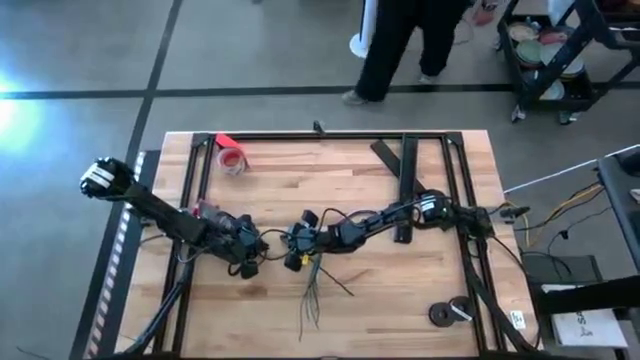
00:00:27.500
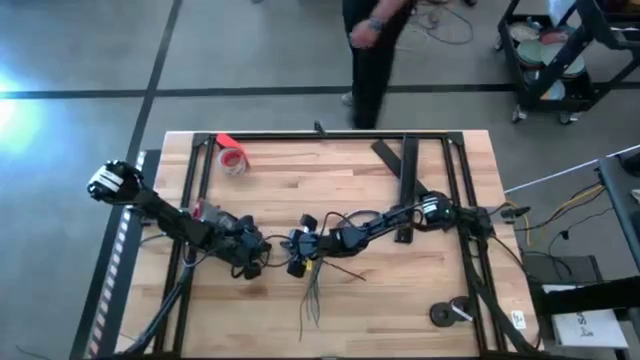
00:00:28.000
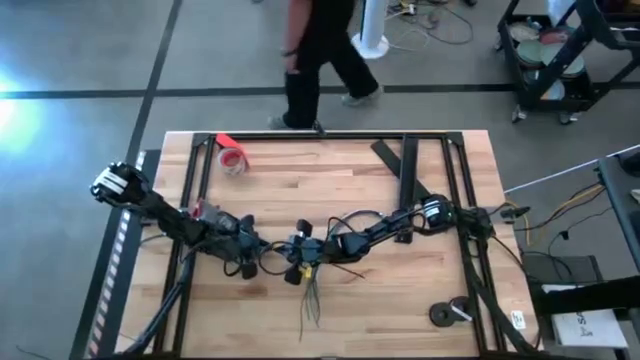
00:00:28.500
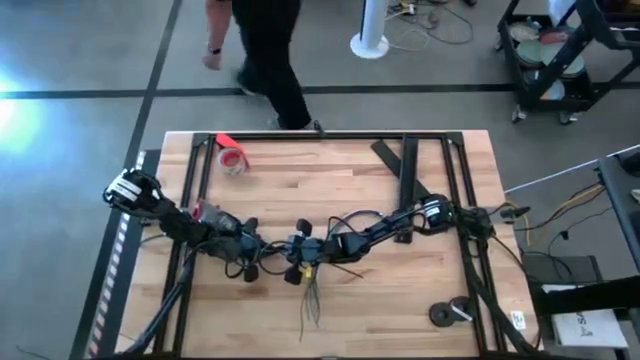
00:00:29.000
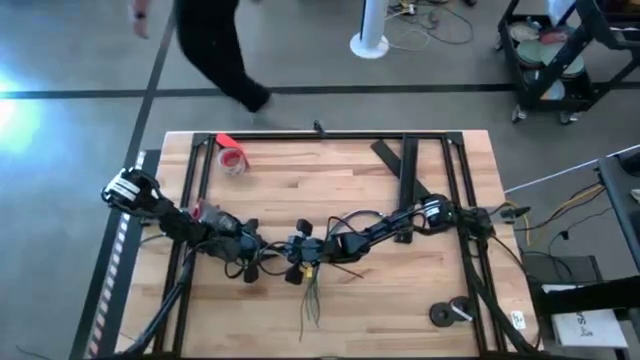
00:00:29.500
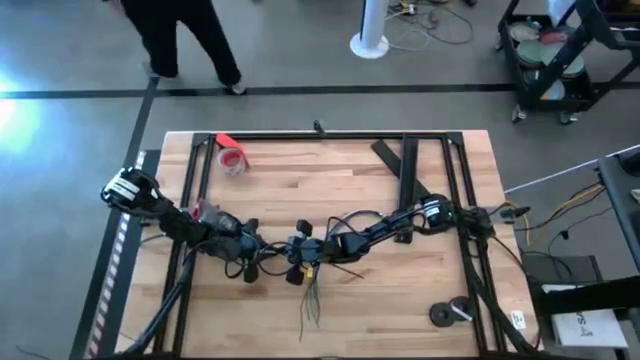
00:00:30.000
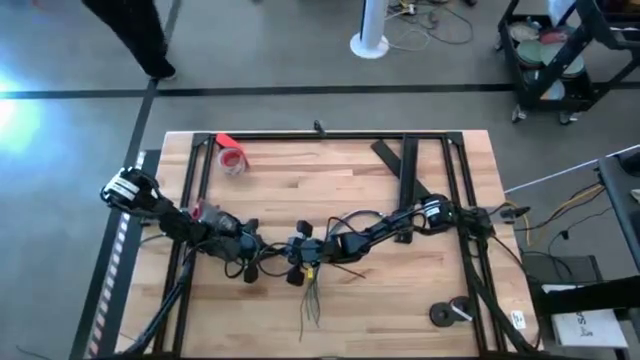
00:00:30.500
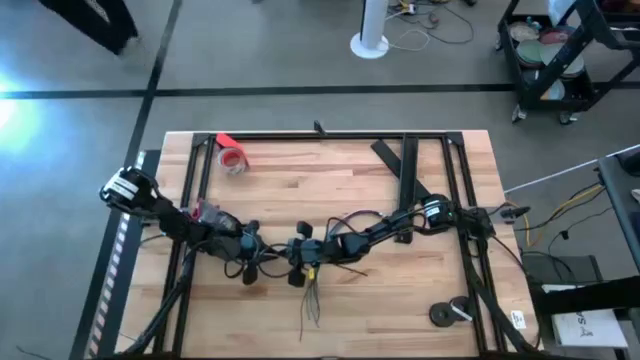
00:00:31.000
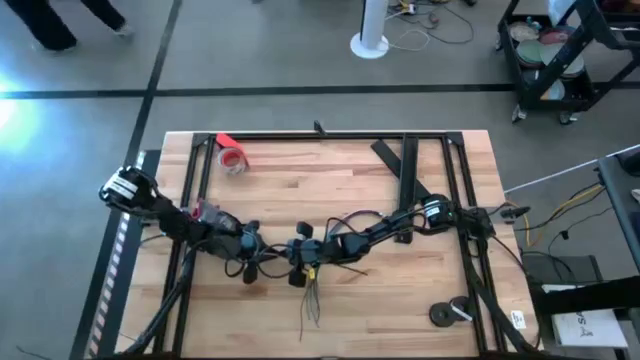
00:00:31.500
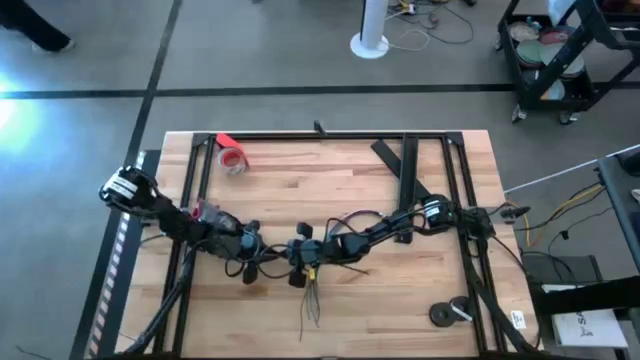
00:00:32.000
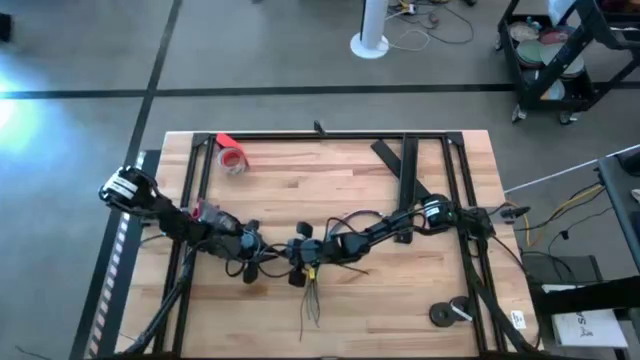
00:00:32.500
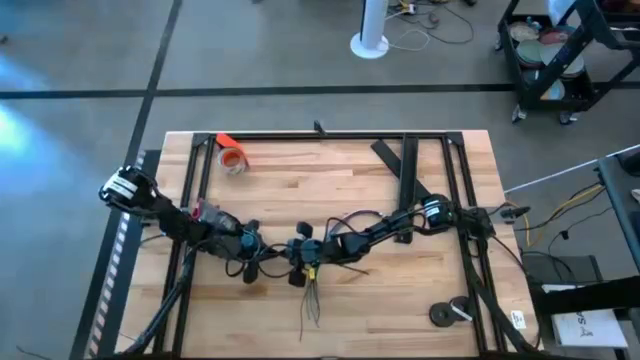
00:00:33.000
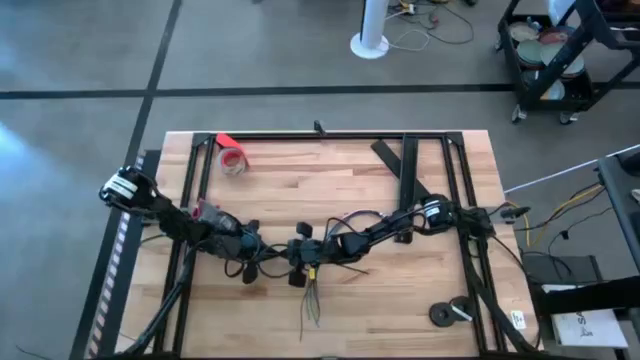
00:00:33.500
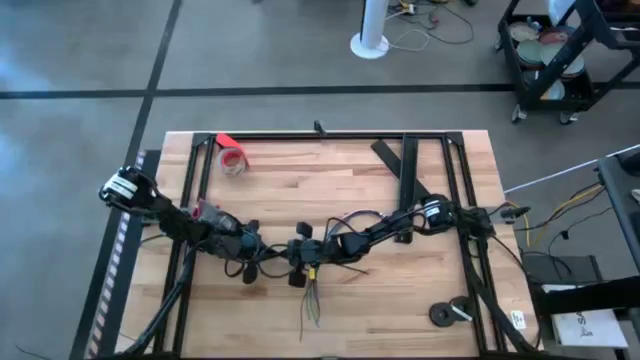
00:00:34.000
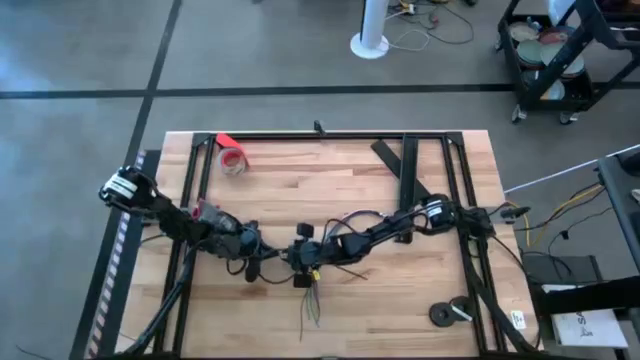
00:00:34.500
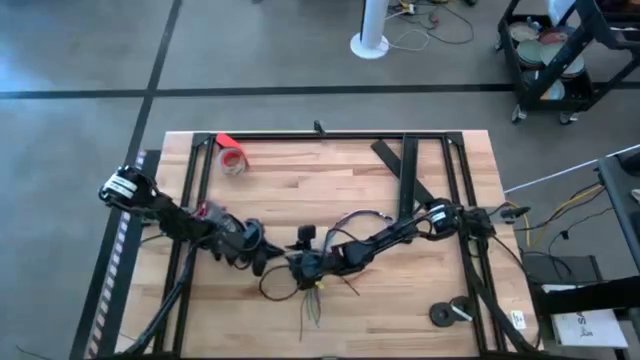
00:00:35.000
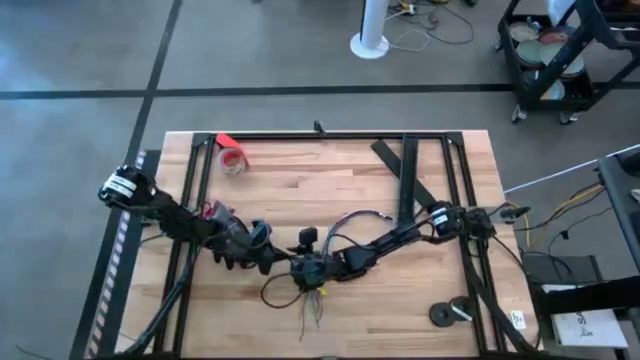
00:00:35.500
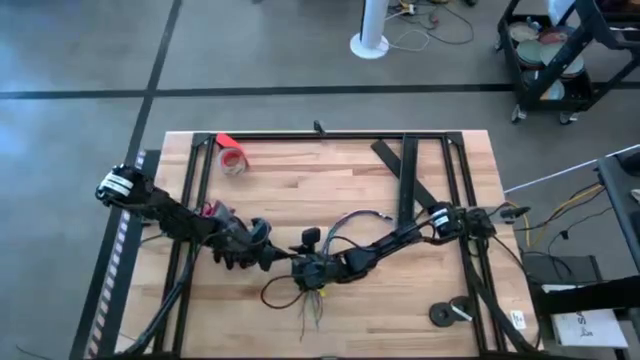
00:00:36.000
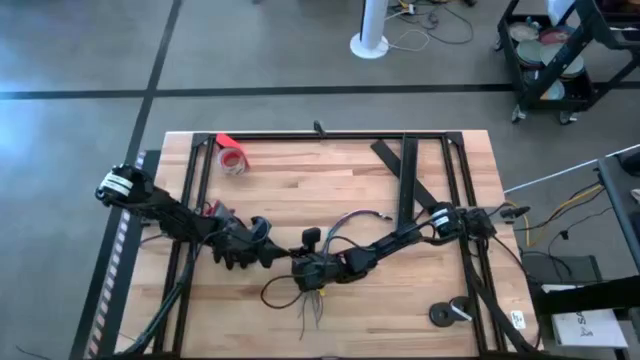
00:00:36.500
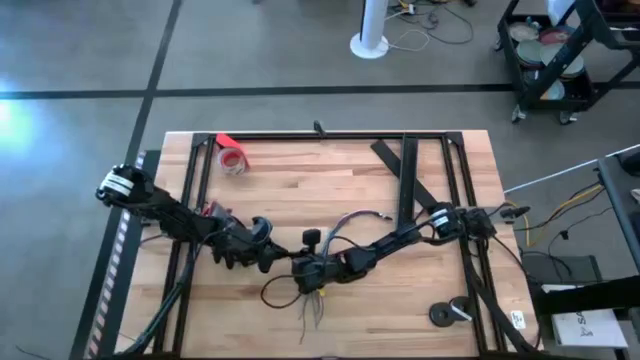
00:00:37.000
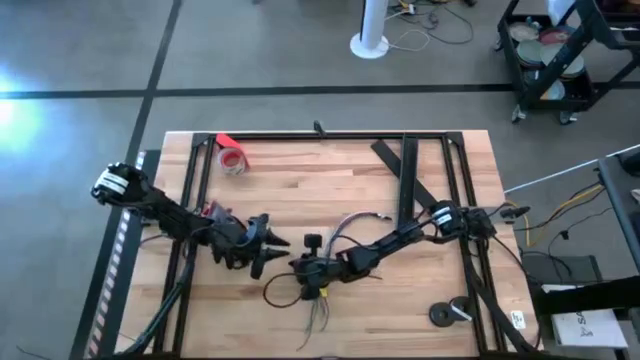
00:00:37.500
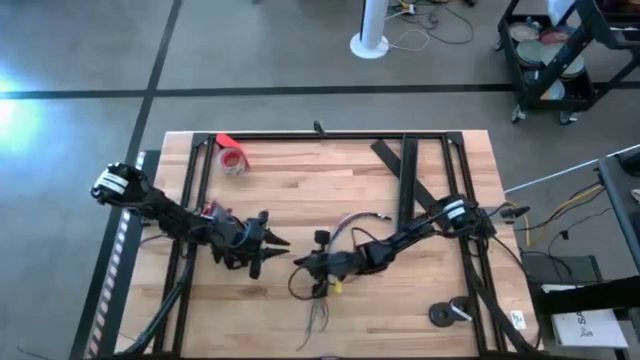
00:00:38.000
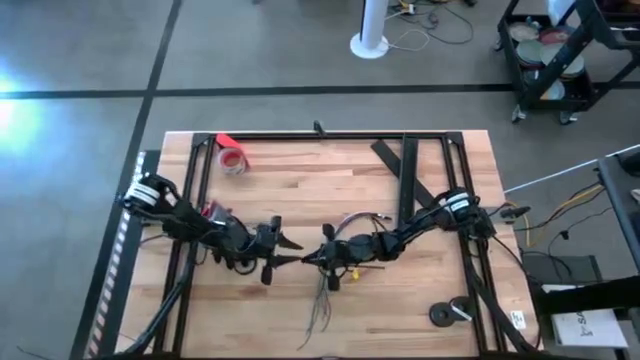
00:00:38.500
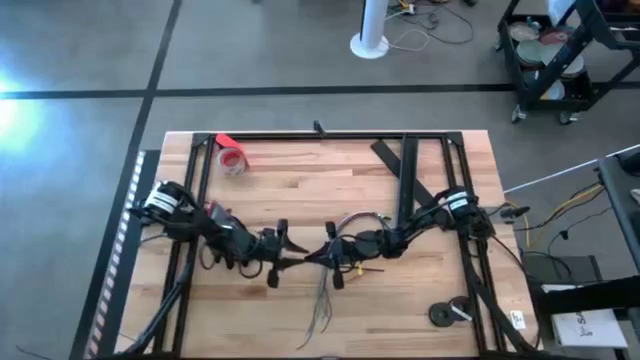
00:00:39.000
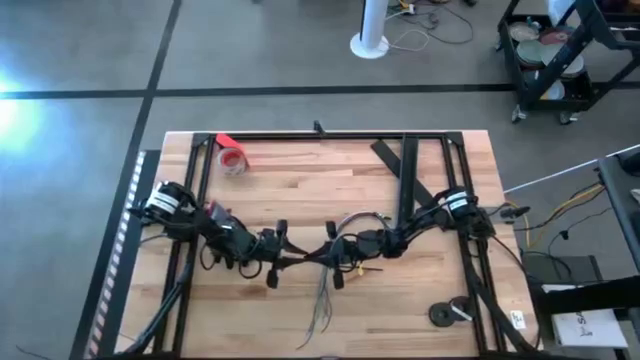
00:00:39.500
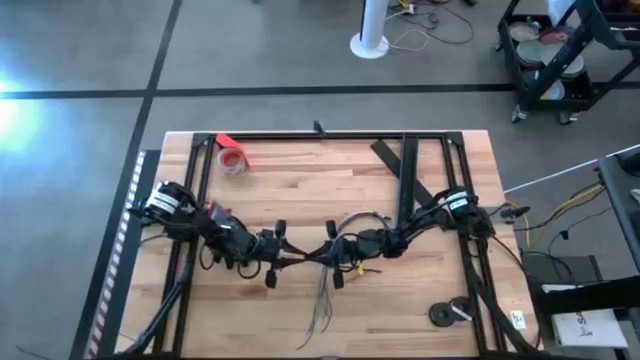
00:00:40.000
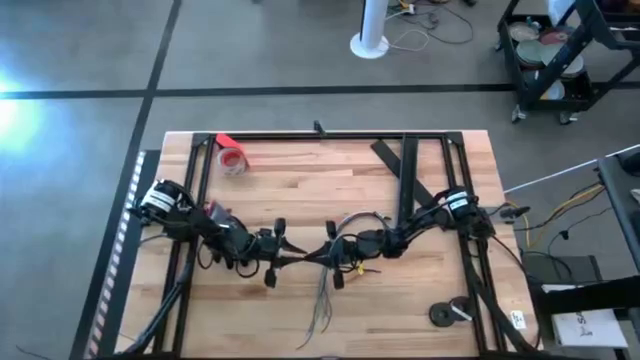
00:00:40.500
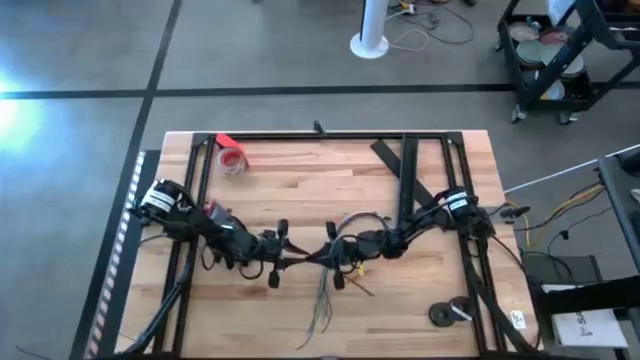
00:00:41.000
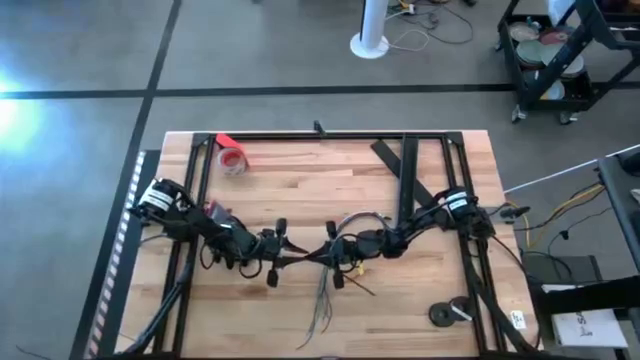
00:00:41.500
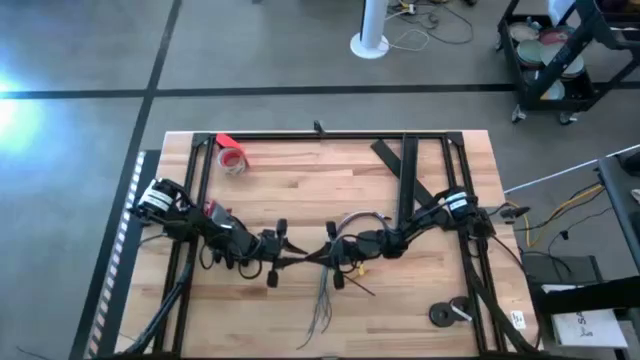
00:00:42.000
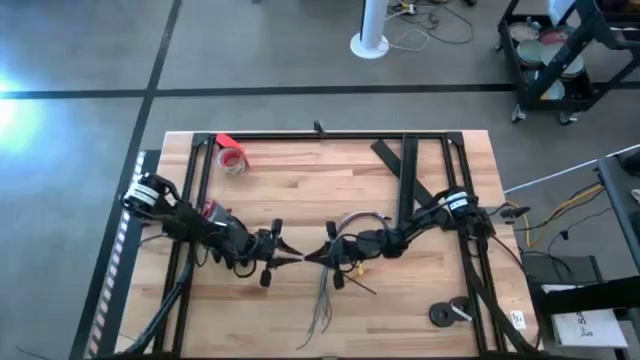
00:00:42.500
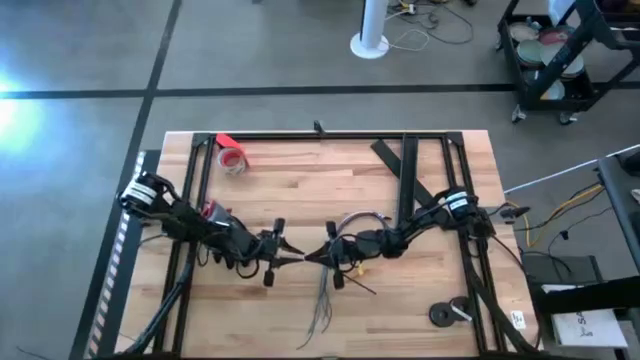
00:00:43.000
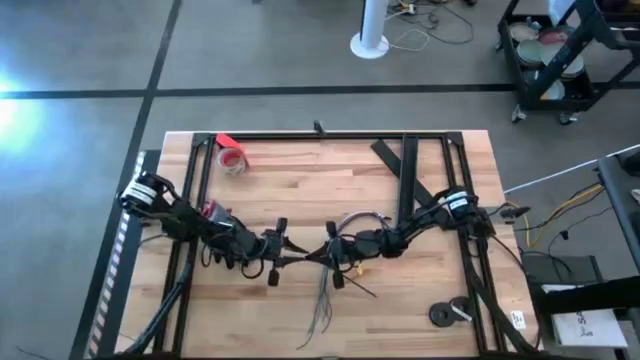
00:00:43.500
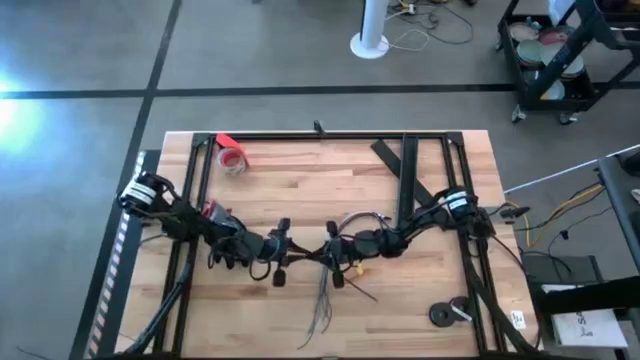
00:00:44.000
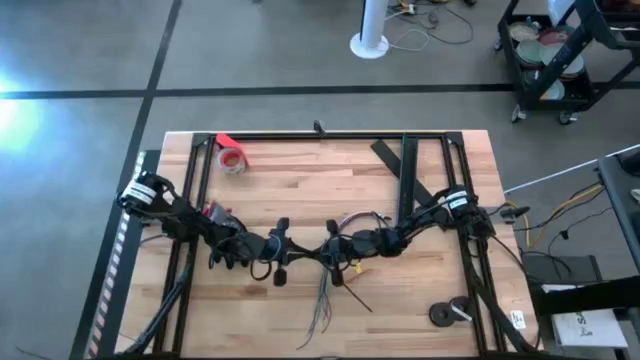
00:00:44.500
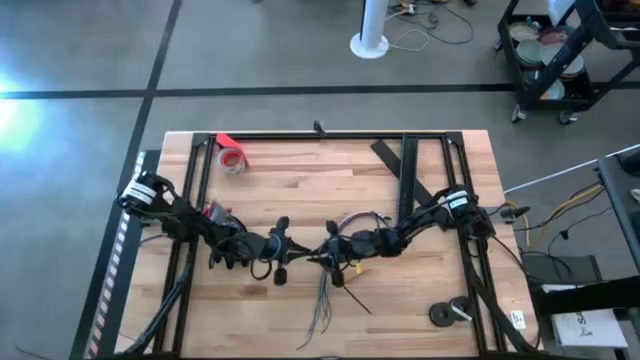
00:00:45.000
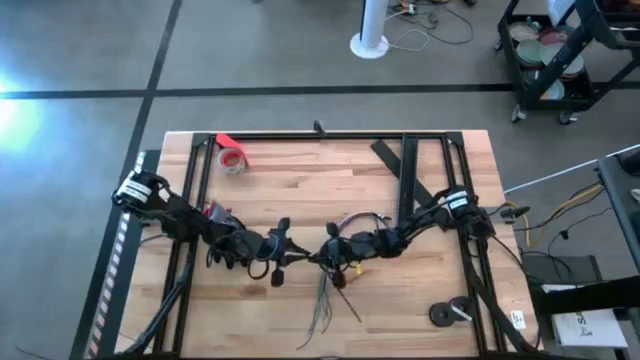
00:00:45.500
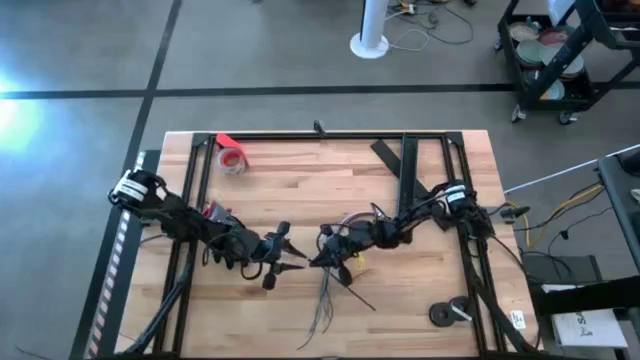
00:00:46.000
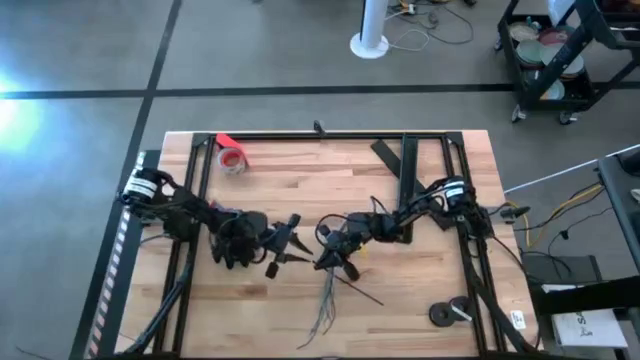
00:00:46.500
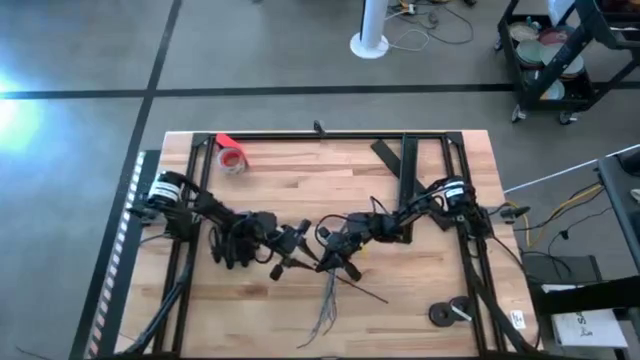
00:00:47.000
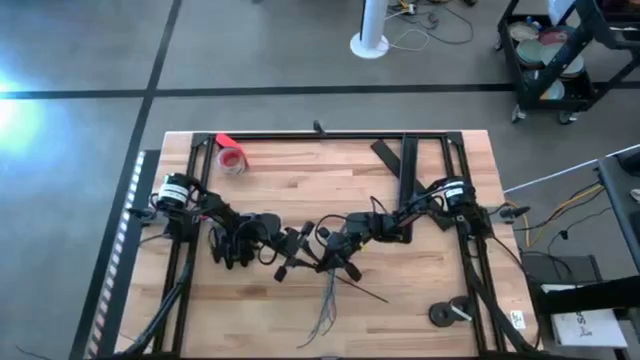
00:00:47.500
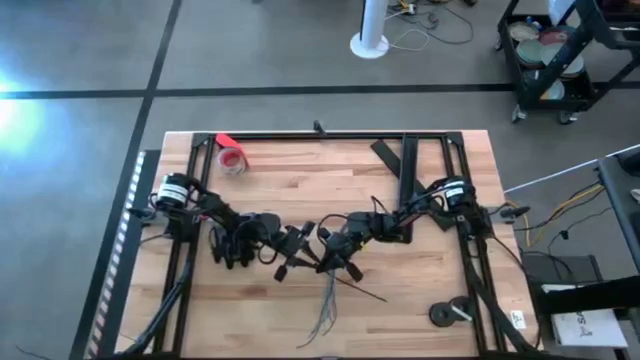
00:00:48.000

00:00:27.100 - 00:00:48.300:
Task: Ziptie cables
Wrap the zip tie around the cable bundle
